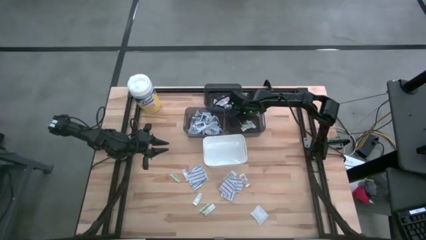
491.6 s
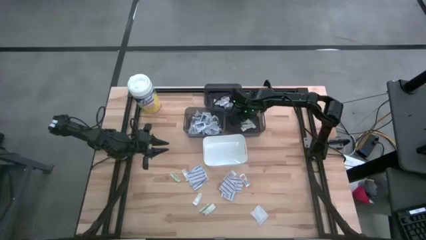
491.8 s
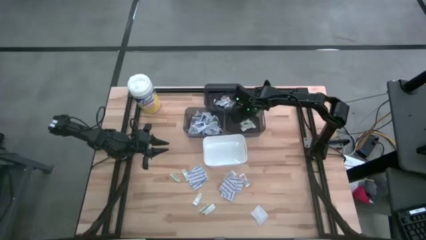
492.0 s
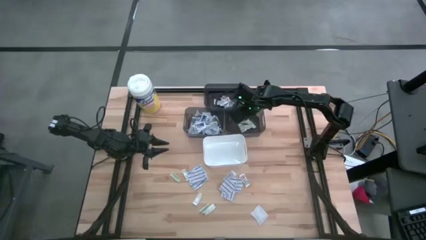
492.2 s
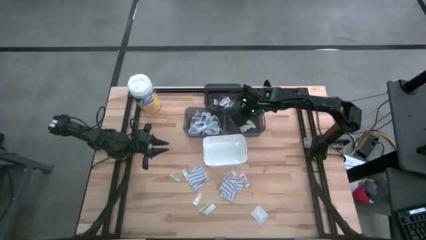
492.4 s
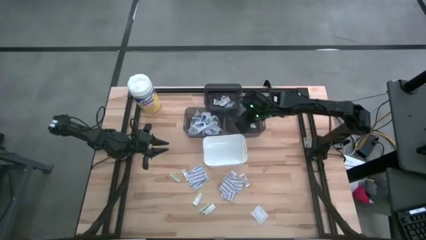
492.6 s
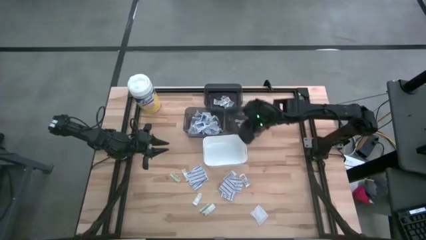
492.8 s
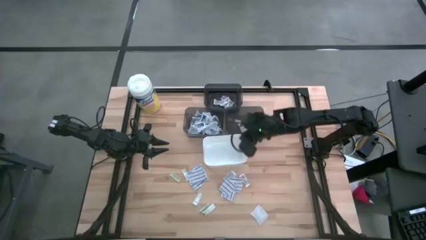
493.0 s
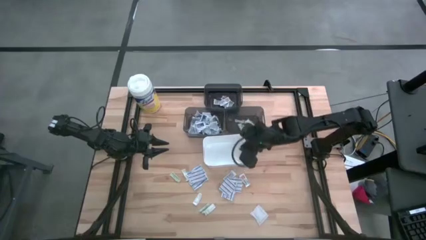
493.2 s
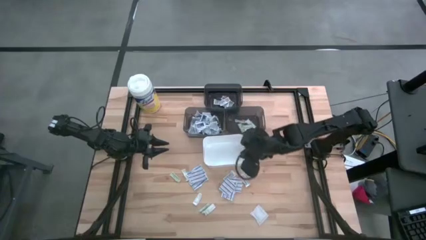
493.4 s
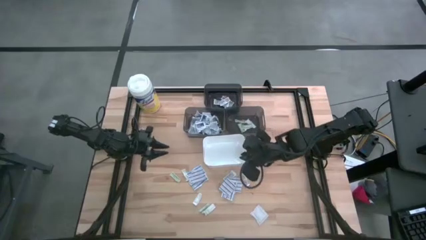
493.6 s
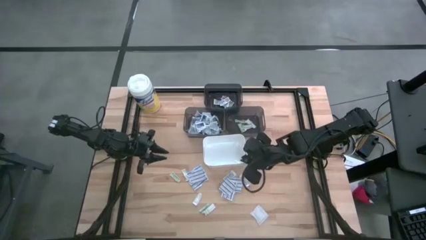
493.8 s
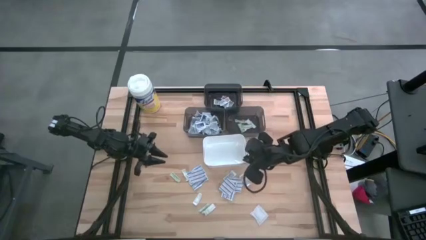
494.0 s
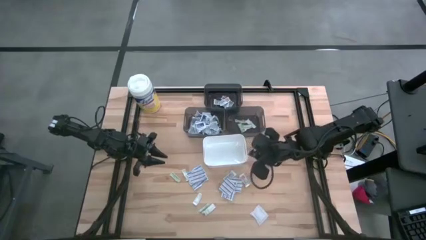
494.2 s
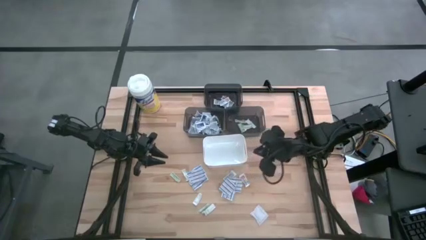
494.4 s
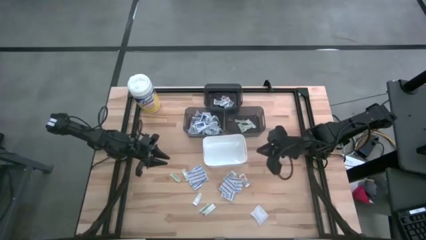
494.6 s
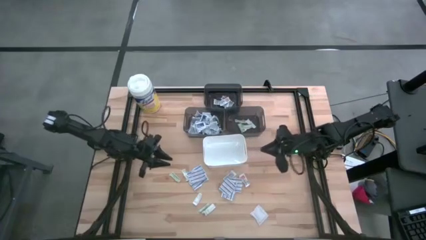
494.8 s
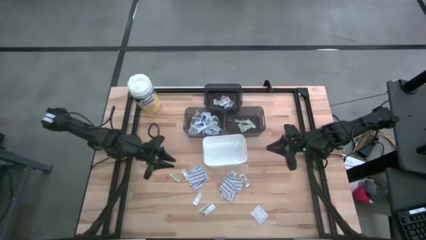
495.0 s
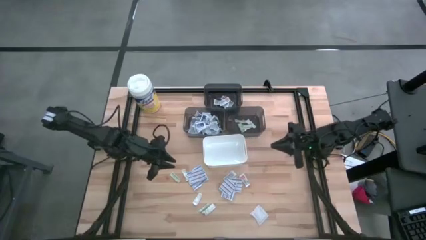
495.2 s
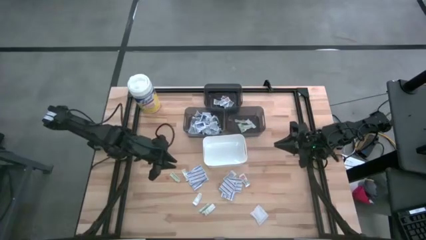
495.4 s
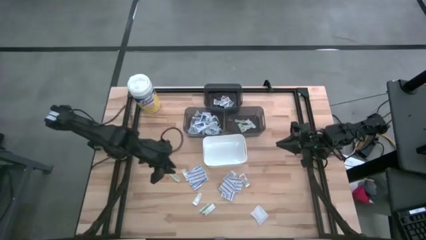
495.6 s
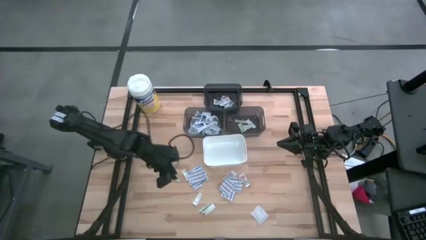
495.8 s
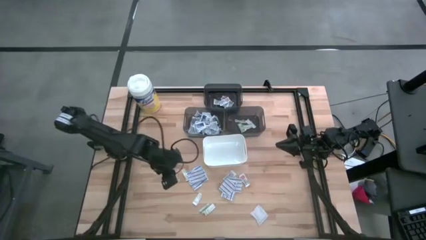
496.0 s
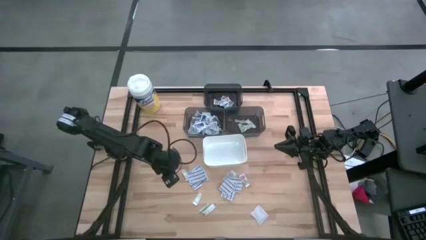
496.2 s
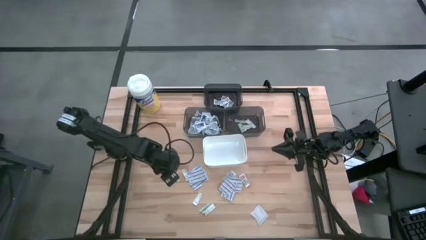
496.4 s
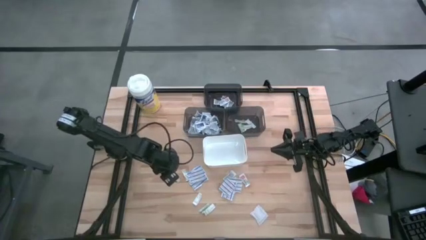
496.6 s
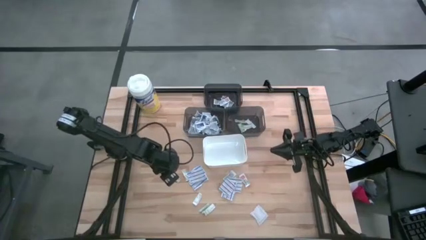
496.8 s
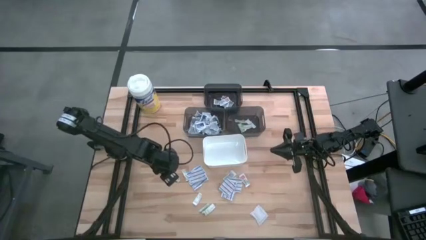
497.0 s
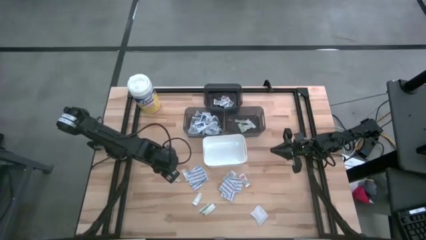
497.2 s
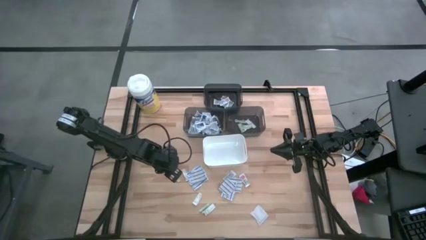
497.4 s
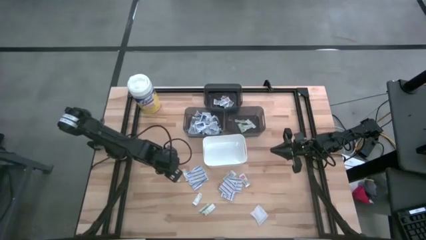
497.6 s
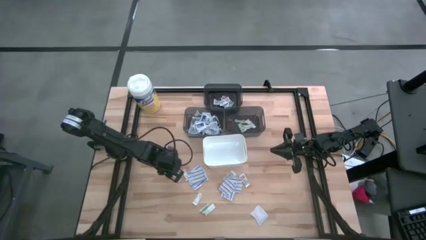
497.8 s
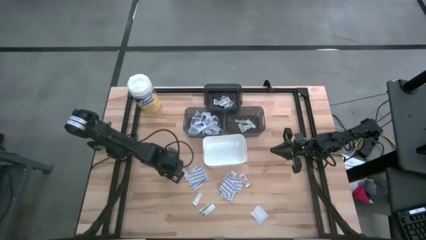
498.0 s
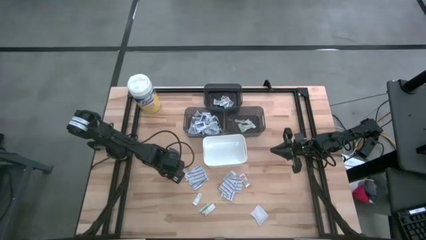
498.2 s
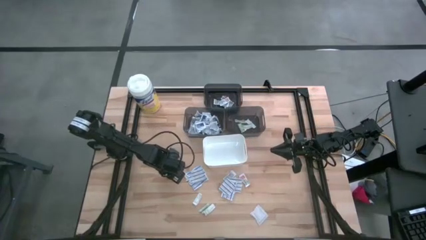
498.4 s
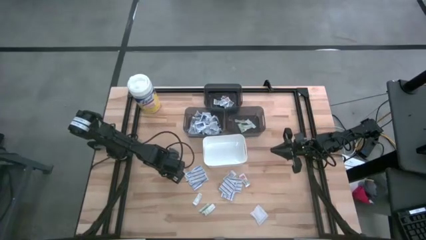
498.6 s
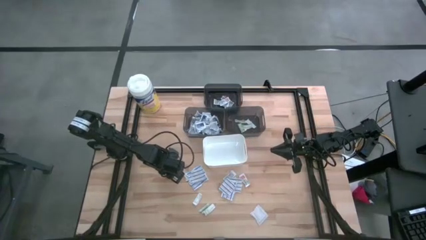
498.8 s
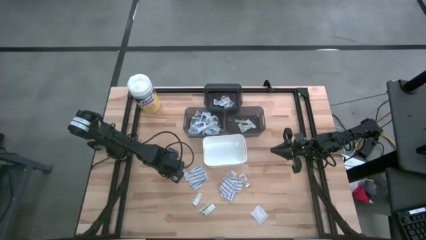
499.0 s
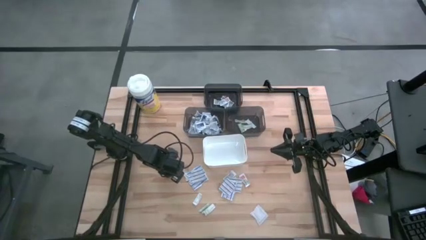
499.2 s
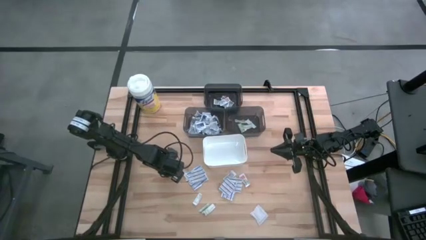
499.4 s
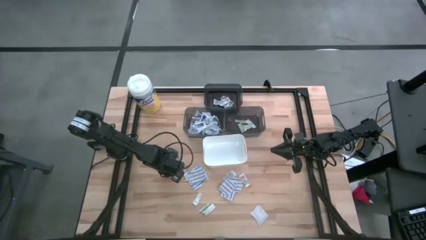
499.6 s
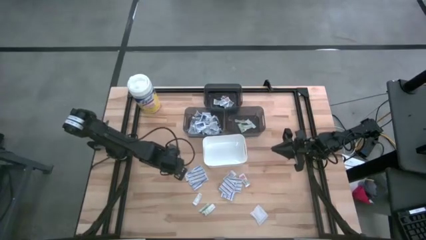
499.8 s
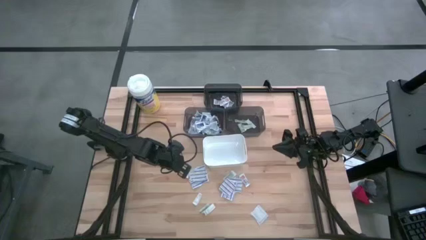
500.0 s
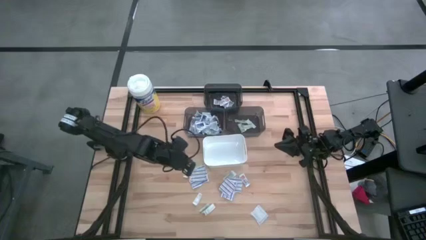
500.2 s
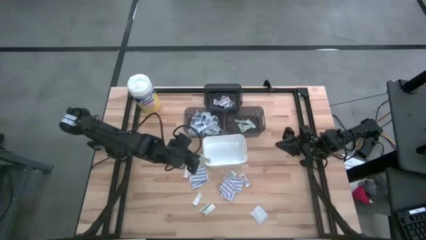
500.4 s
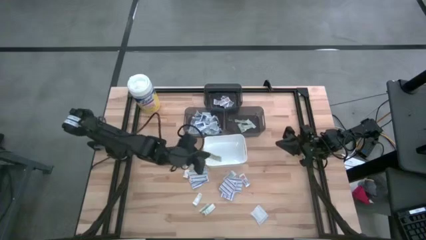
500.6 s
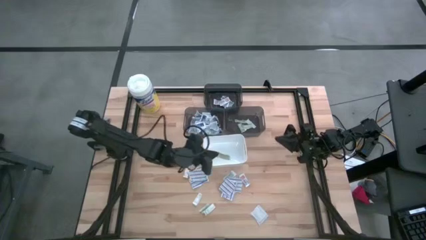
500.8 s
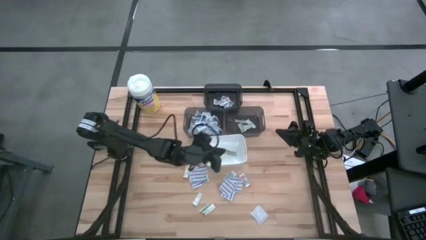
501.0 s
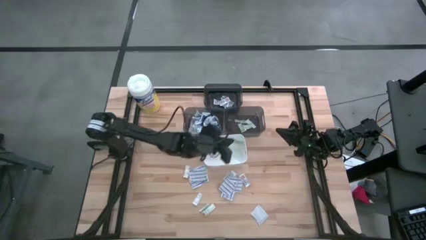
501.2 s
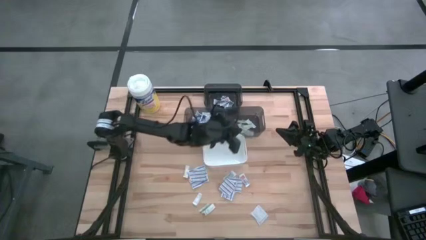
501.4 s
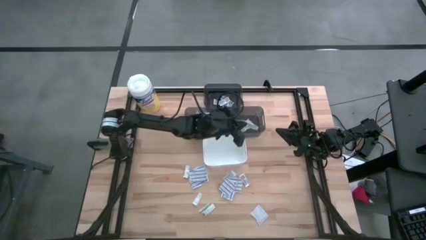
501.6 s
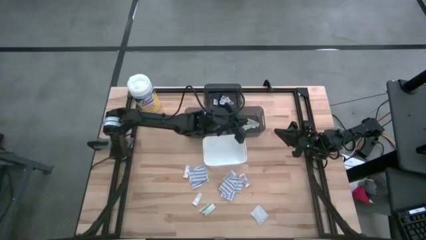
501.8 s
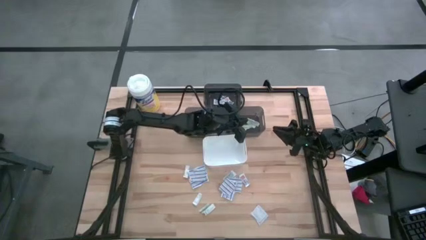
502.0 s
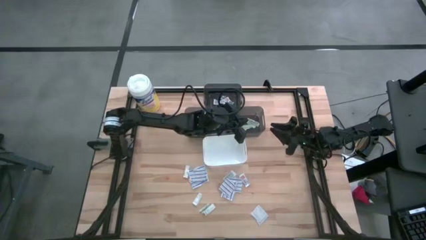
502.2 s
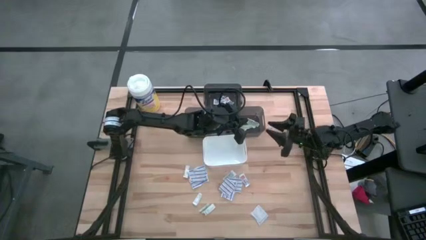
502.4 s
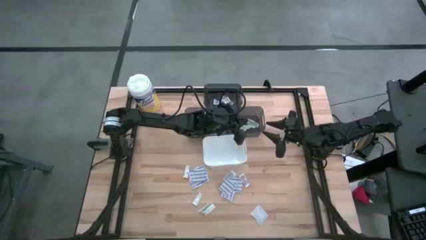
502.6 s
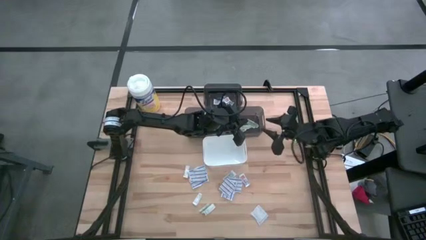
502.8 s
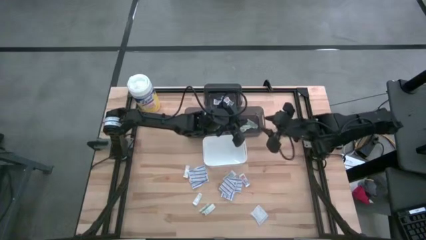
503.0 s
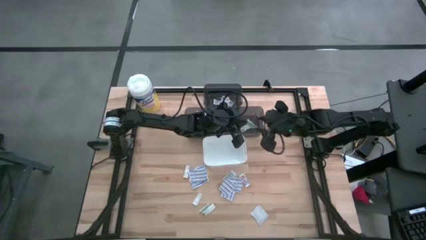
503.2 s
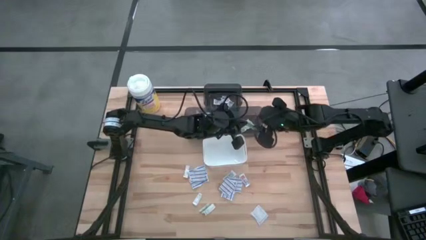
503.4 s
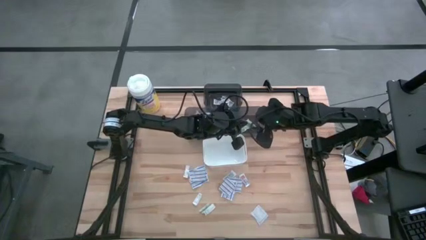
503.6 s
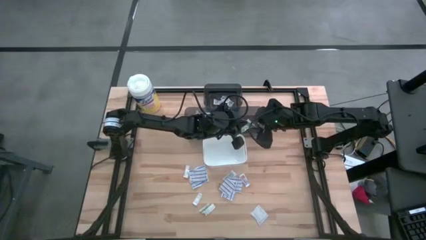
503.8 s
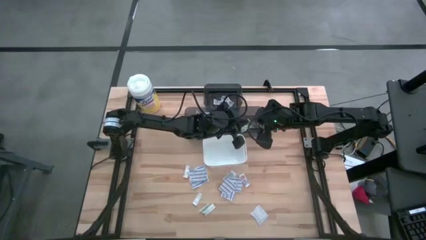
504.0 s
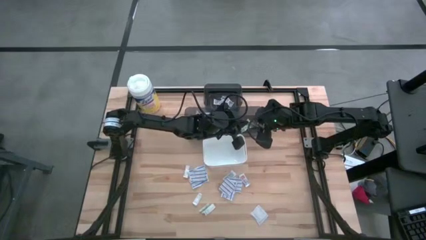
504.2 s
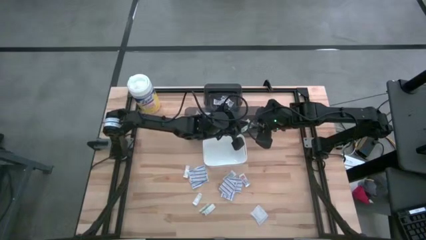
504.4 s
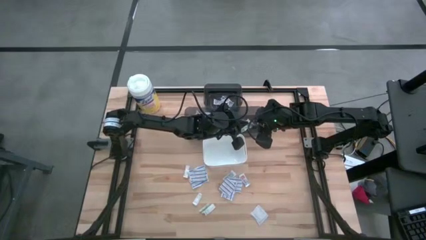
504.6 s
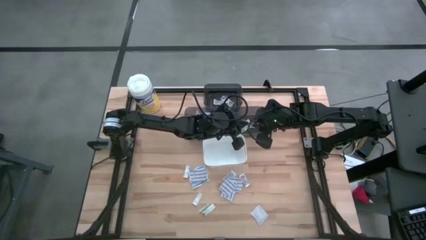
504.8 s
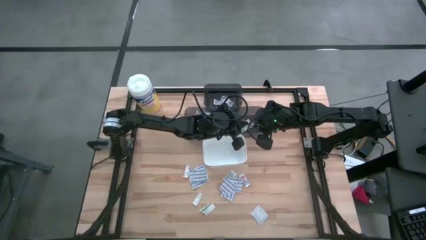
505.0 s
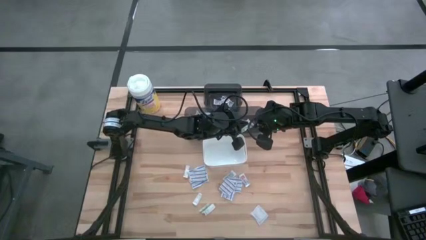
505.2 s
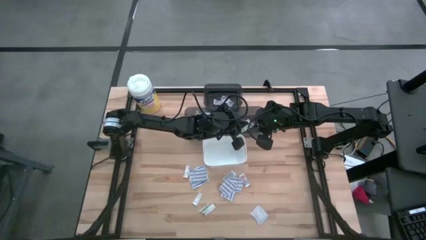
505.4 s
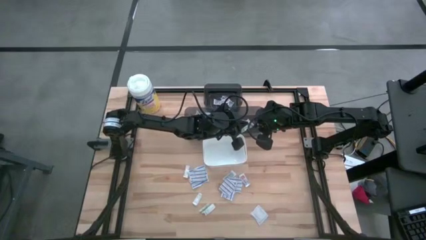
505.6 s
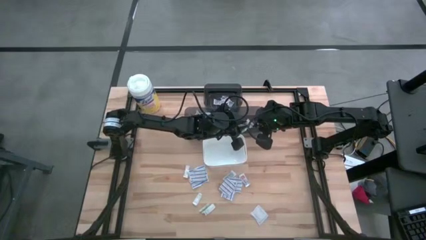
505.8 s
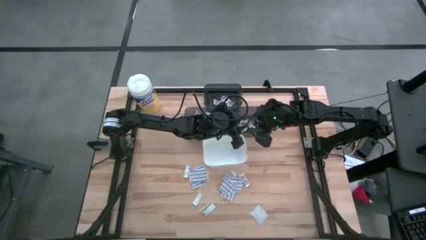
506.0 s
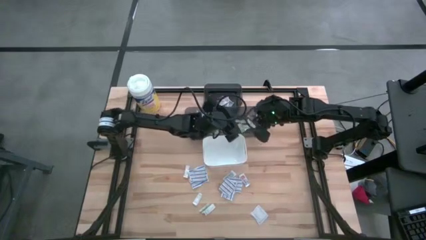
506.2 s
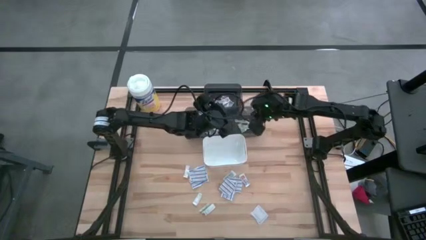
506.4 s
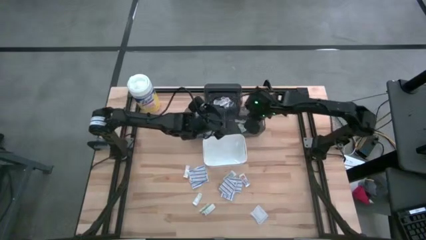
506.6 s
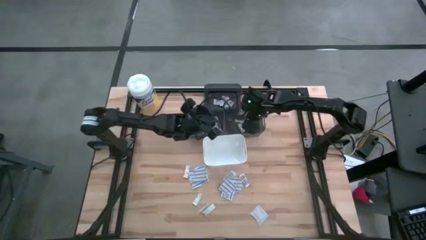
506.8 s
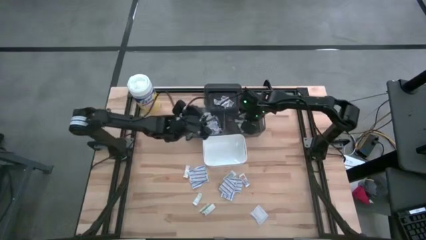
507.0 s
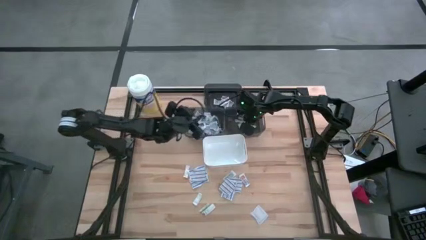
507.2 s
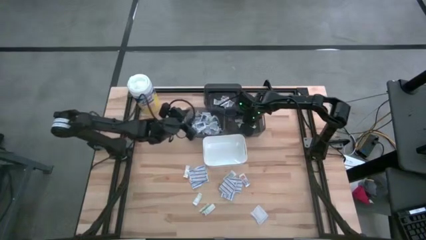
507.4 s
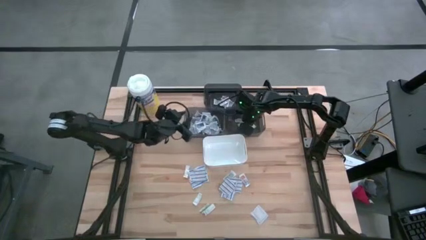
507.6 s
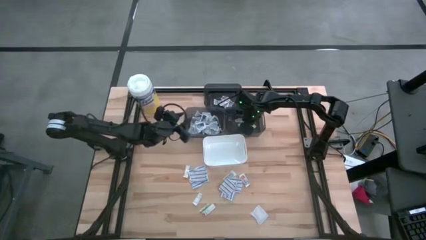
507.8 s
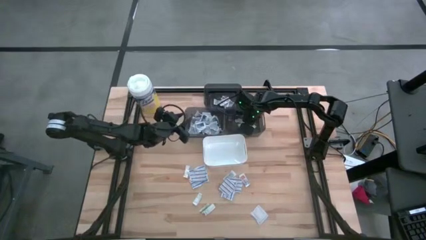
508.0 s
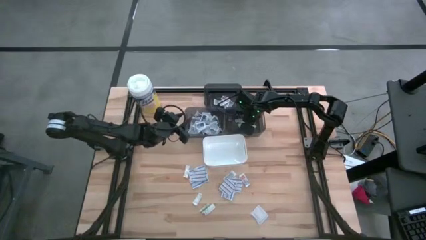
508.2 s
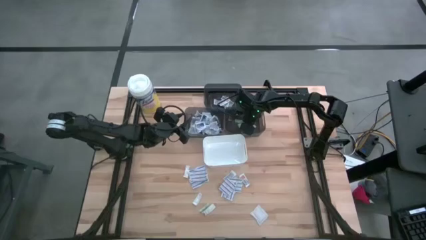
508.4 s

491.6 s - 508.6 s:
Task: Pick & Place First Aid Supplies
Put the green bandage into the bottom right black bin
